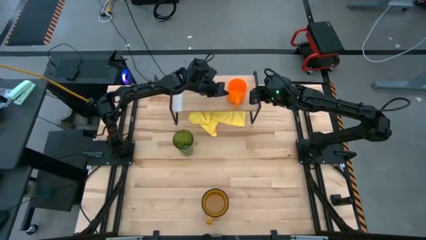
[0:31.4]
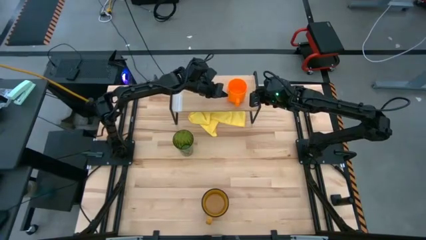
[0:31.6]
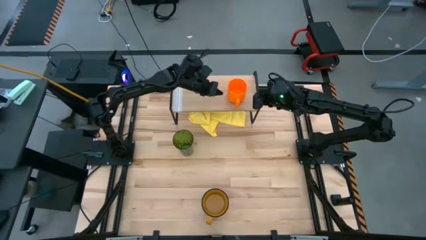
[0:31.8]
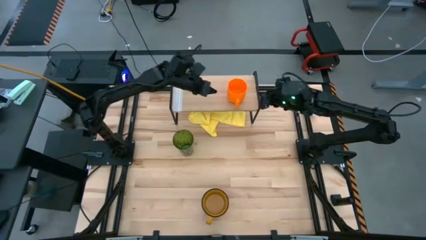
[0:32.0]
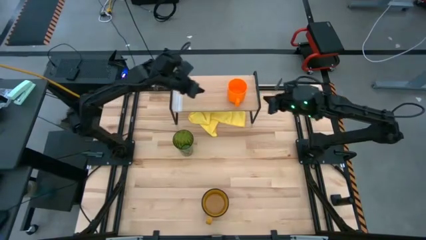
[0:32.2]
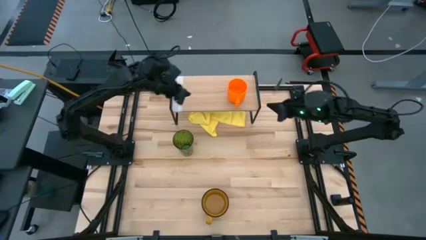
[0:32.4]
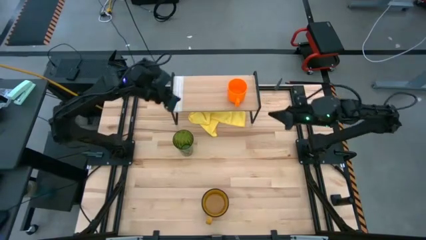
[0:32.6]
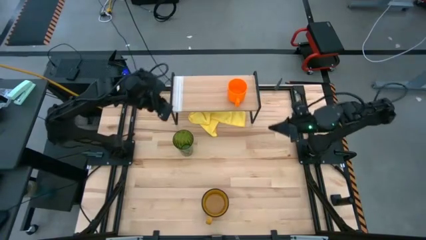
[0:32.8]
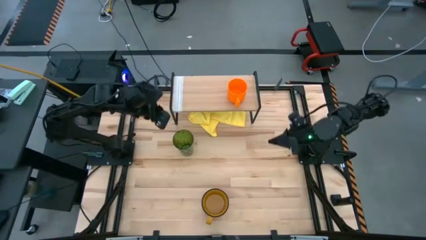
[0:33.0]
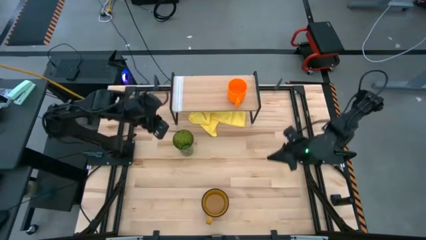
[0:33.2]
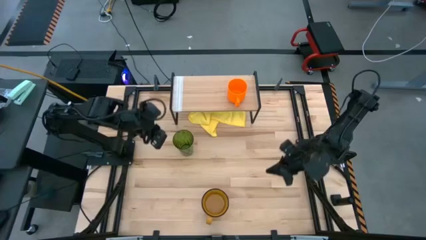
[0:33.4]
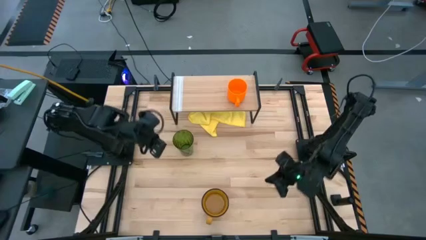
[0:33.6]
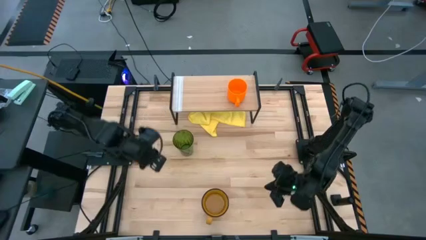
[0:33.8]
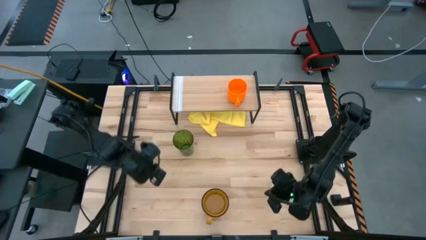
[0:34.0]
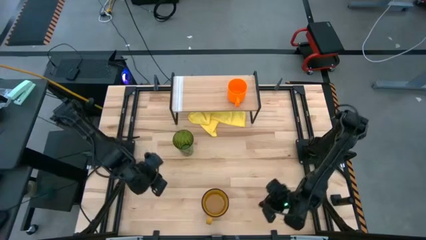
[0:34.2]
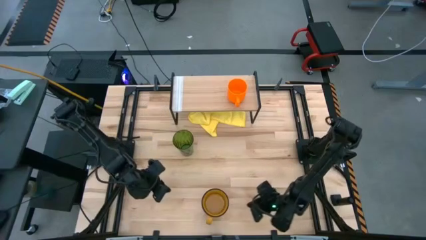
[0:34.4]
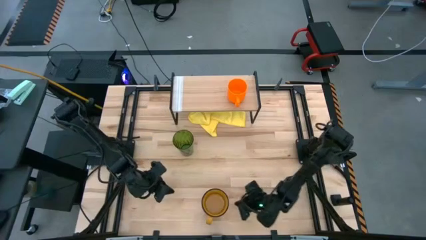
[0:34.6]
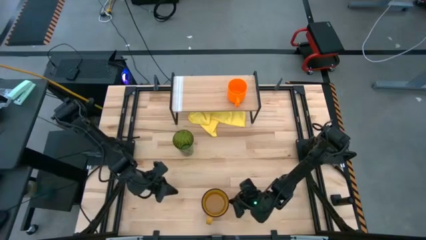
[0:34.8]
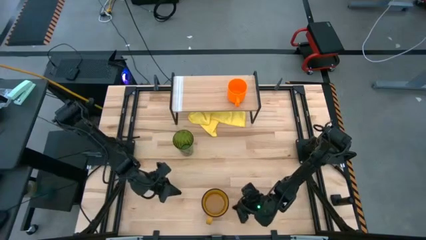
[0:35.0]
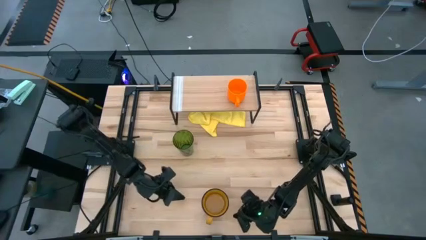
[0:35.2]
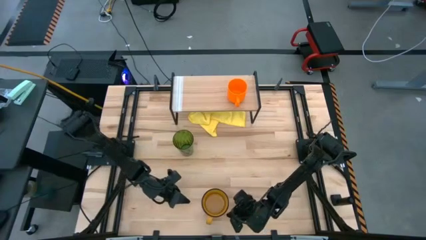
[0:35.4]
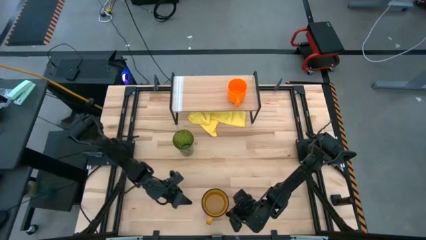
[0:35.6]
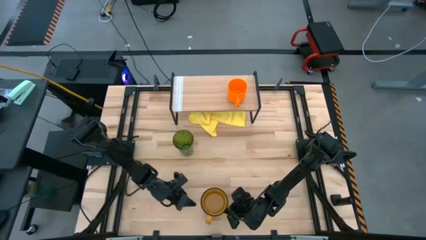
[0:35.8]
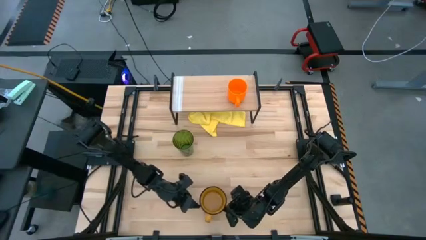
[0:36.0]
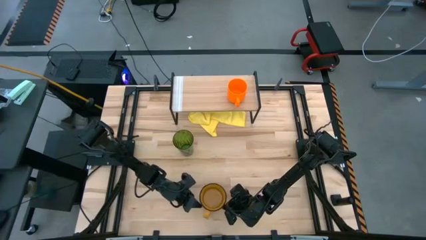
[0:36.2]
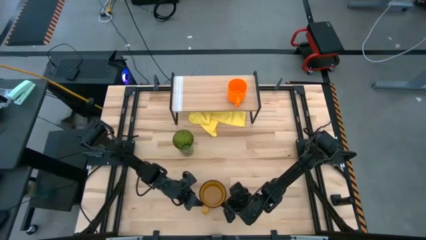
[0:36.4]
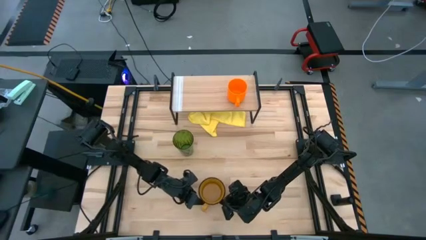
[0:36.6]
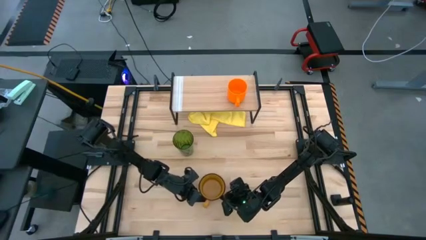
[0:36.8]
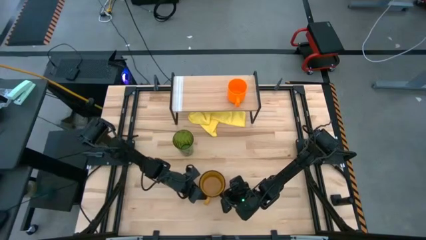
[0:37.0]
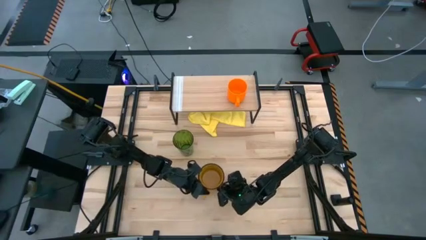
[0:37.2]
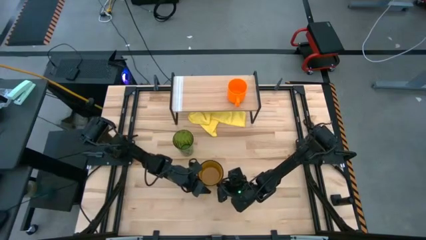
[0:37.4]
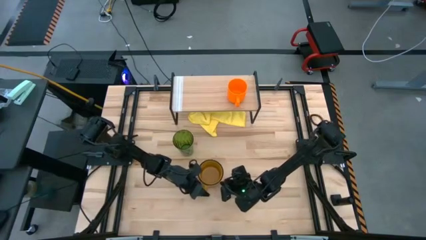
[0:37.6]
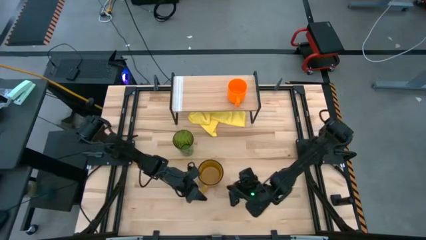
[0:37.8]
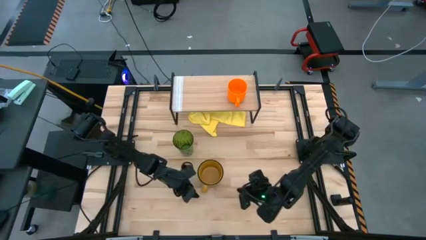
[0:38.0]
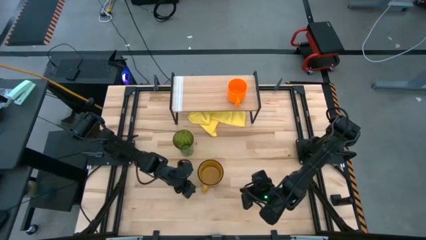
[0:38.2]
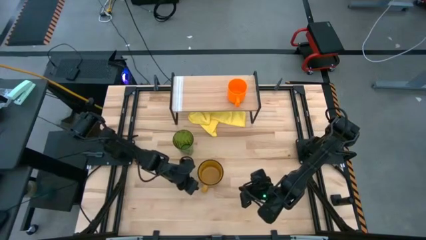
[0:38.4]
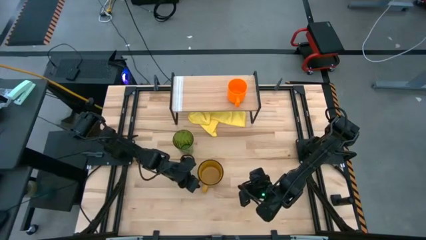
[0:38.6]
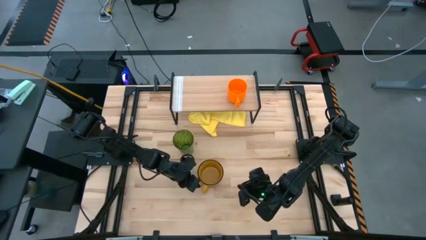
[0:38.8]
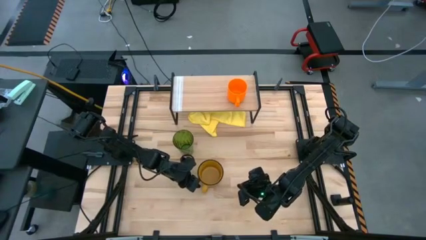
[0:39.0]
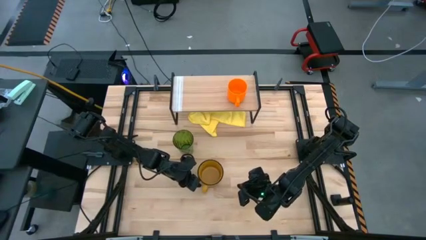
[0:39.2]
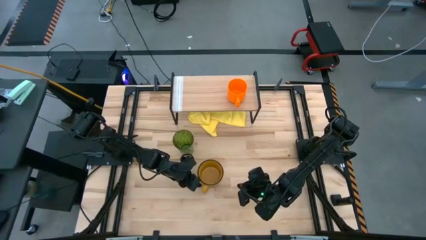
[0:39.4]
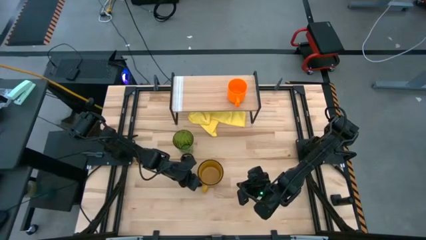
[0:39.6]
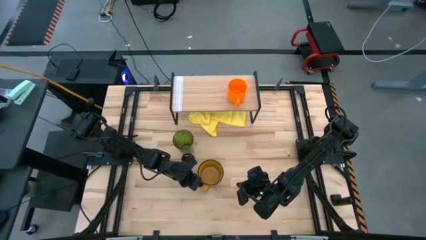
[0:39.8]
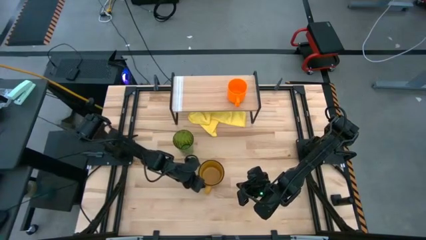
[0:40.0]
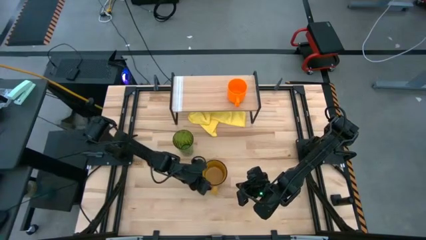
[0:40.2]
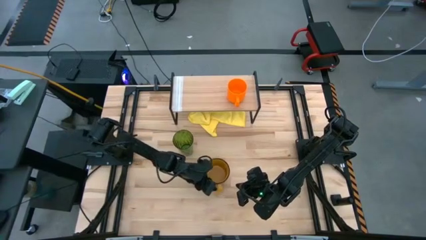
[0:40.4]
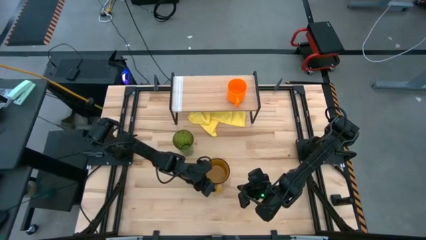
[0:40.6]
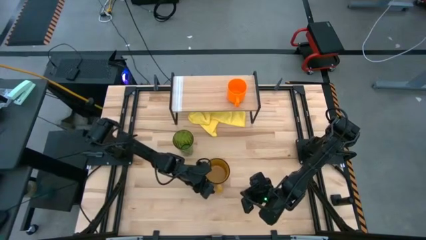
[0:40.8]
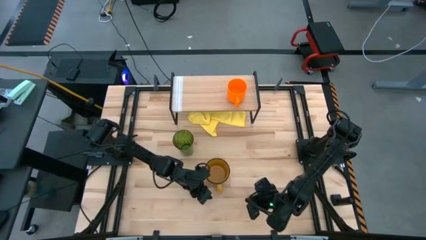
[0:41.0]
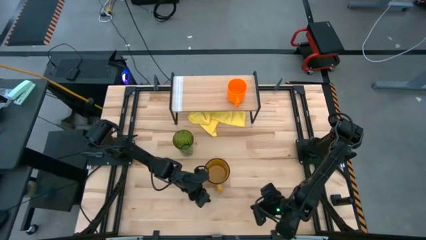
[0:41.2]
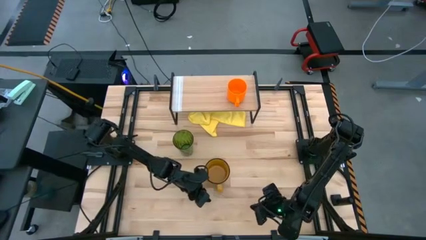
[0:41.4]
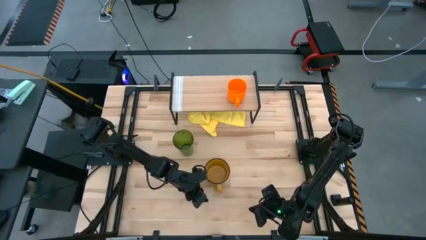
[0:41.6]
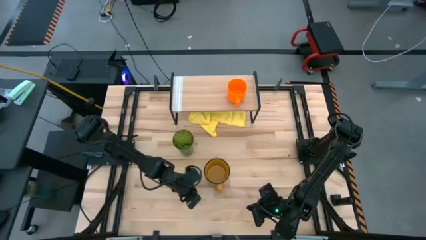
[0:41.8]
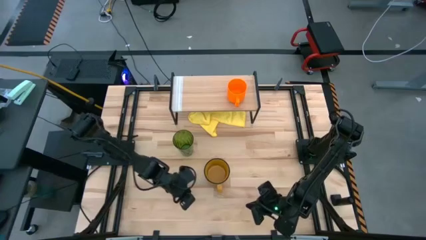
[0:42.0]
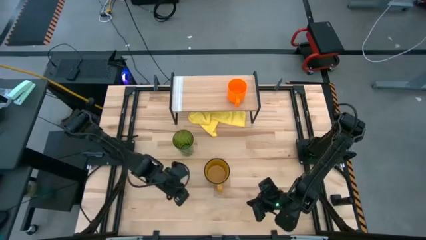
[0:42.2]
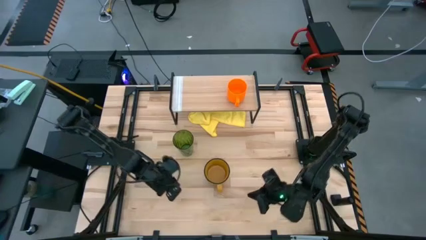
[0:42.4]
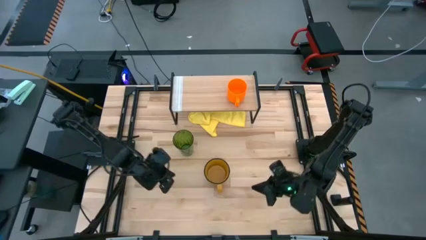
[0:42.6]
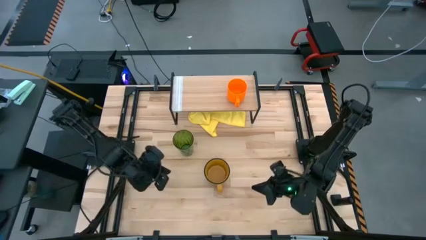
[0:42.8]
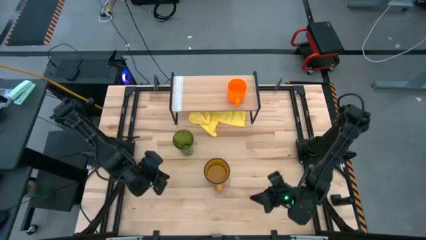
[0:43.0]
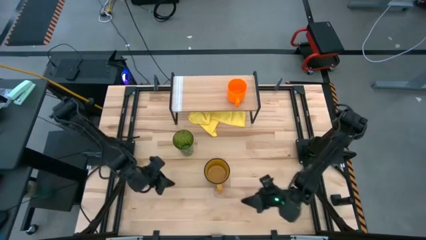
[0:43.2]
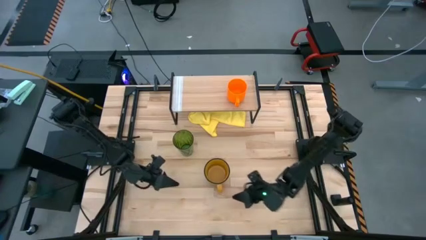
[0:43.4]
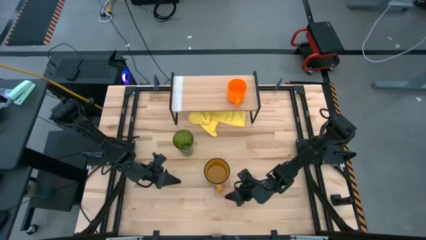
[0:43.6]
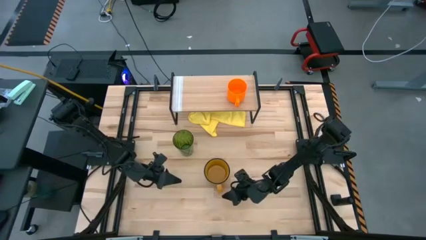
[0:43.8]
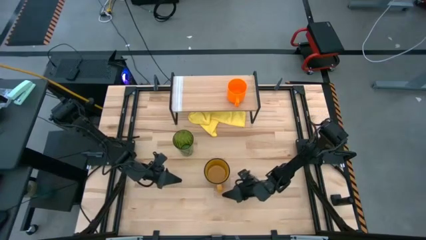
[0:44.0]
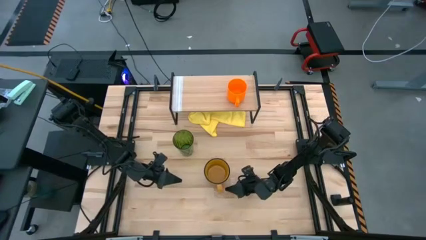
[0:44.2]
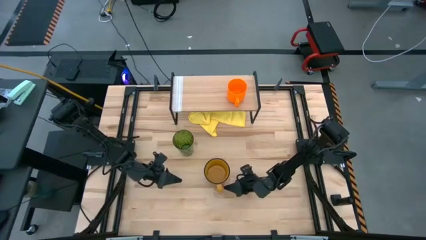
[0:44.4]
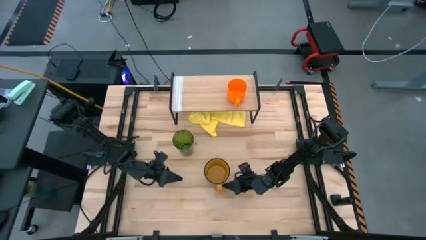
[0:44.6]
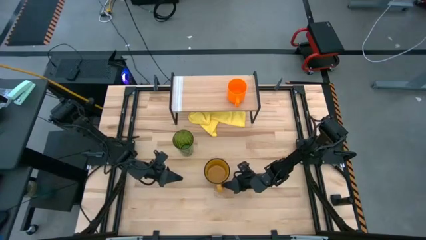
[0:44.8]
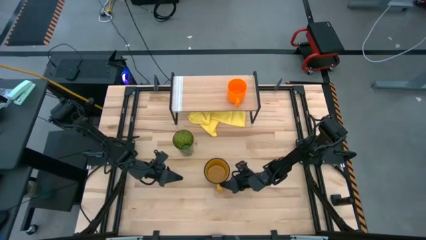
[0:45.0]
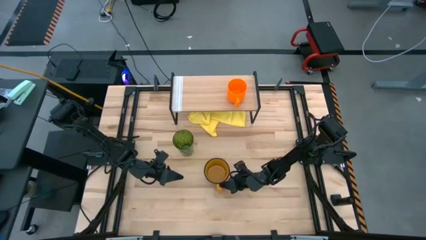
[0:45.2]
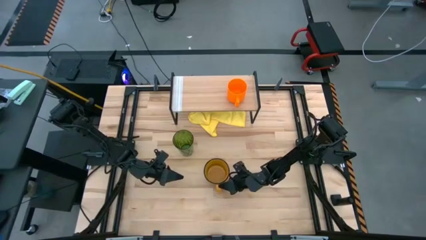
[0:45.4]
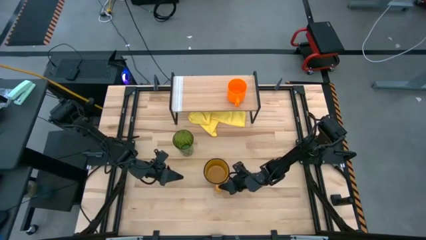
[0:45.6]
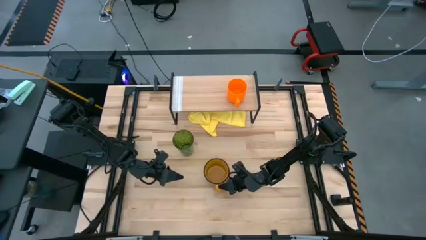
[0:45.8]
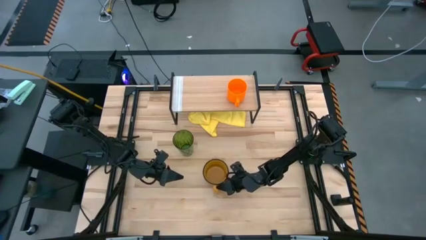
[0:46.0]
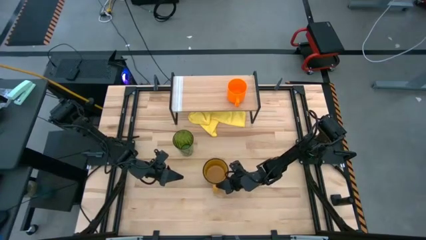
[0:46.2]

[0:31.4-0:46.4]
Task: Stack small to large cups/mugs on shelf
Put the yellow mug on the shelf
